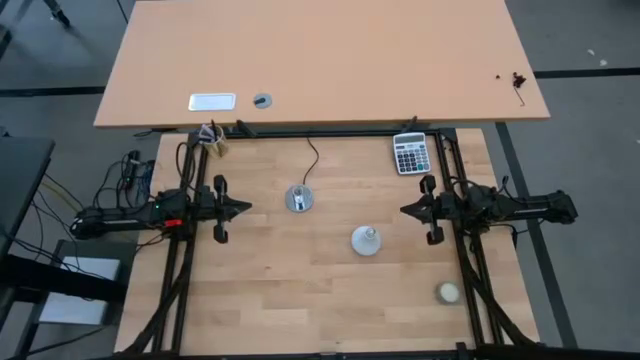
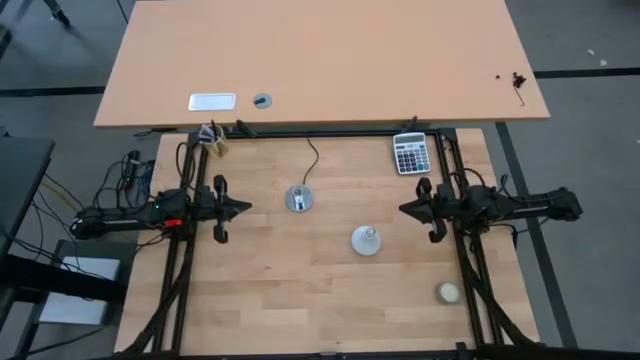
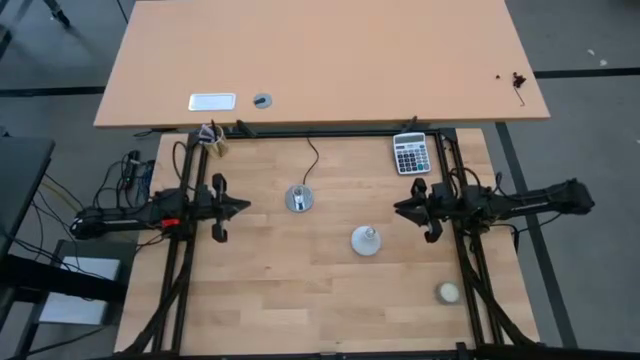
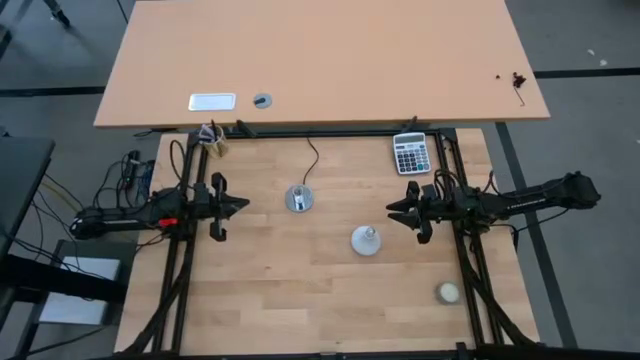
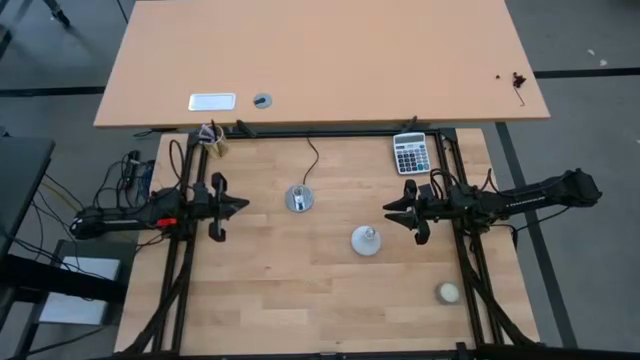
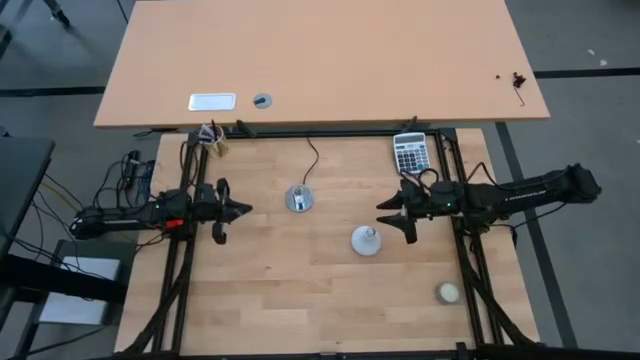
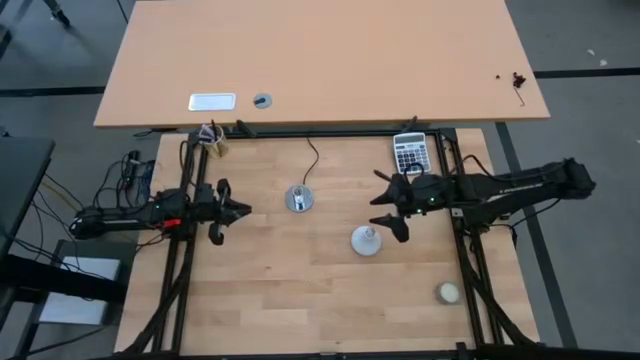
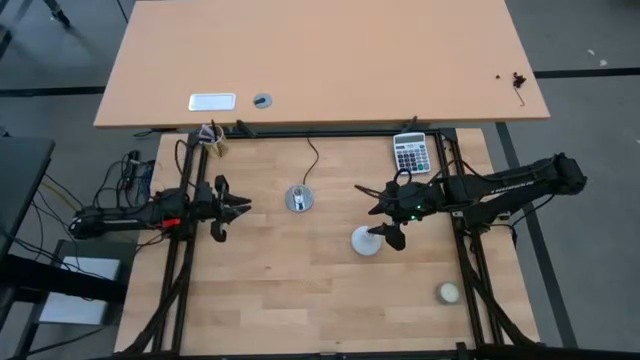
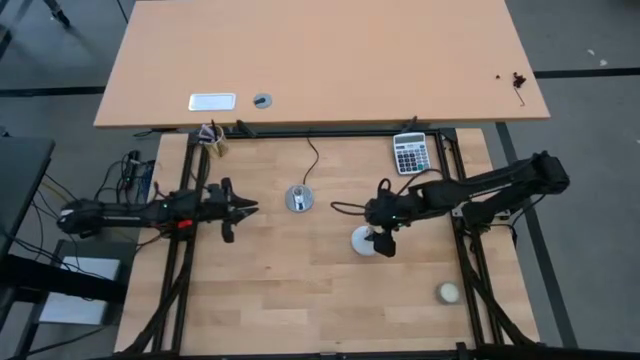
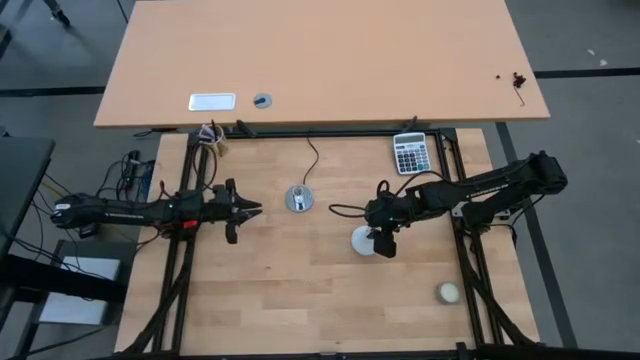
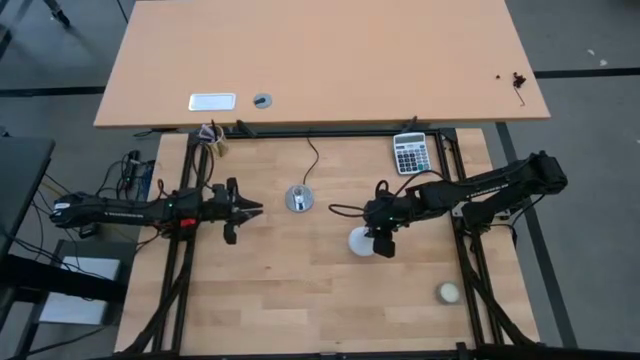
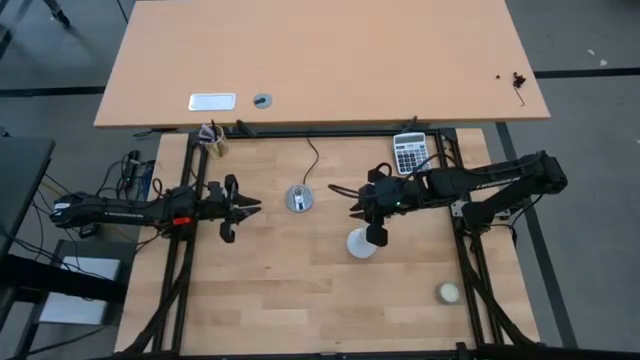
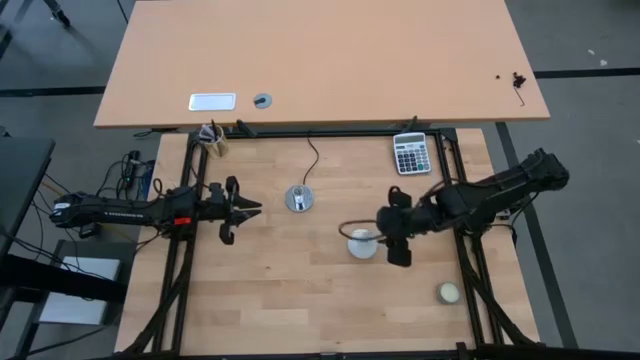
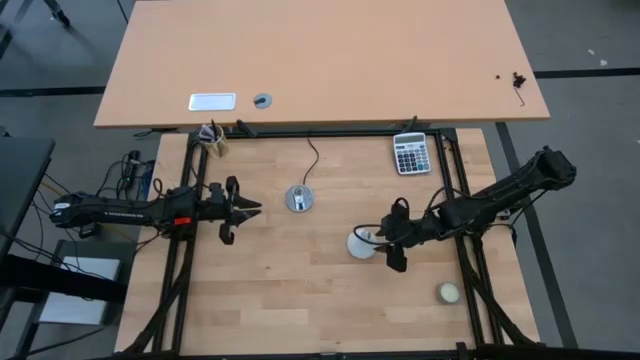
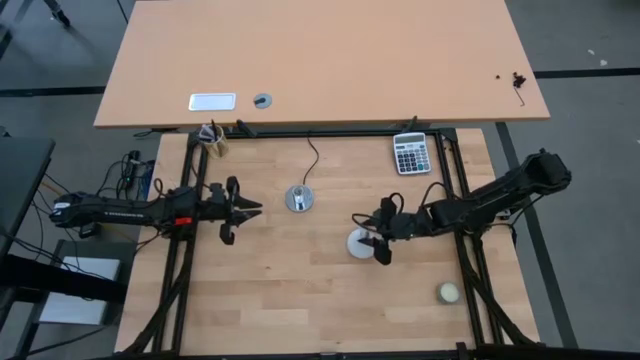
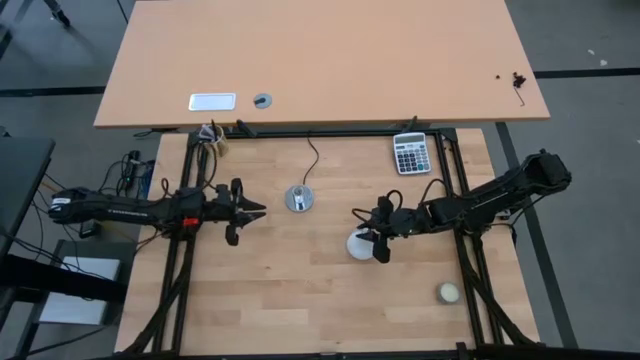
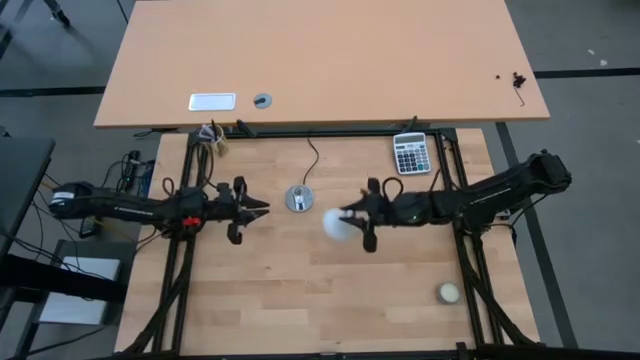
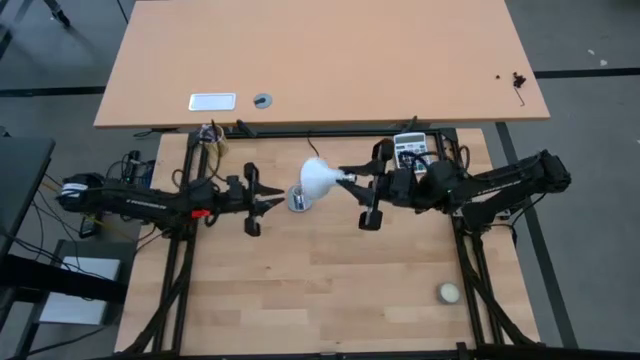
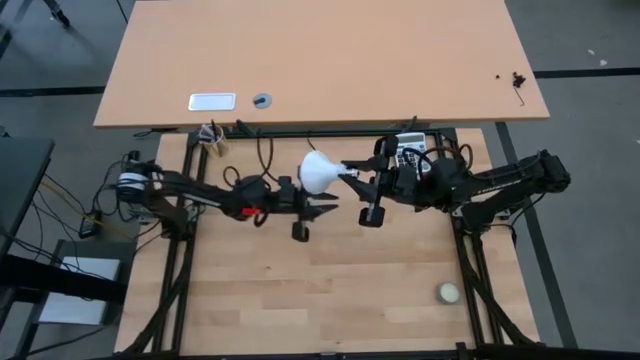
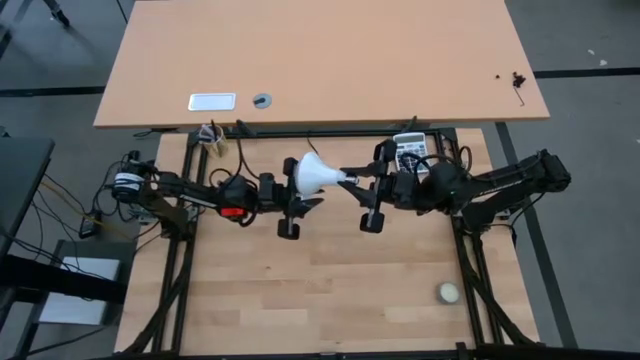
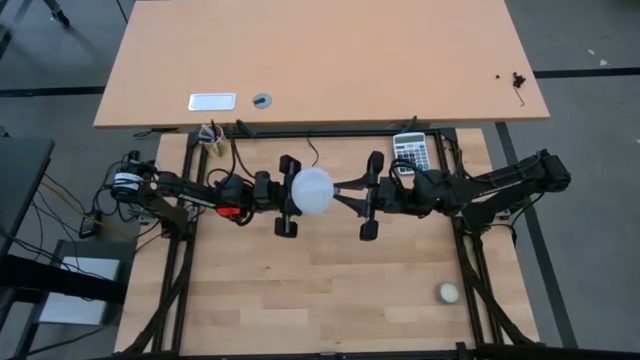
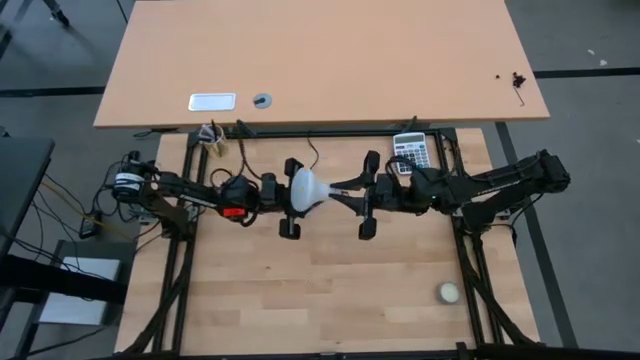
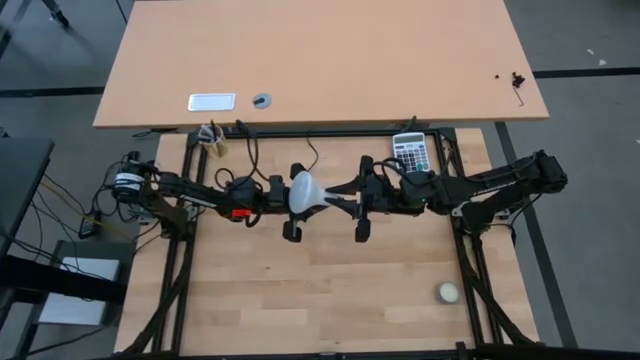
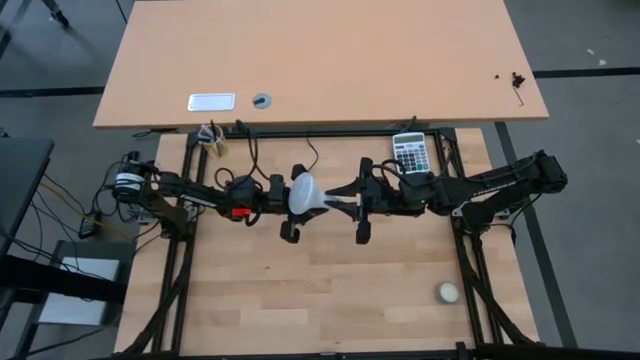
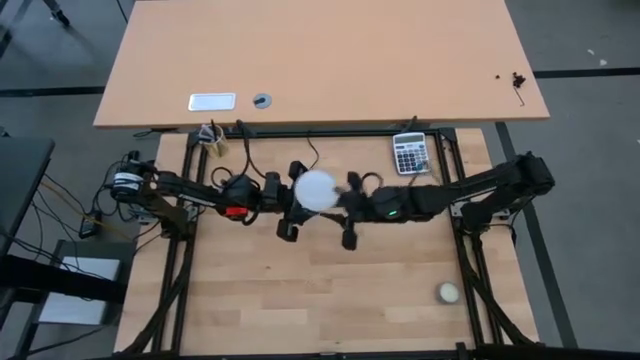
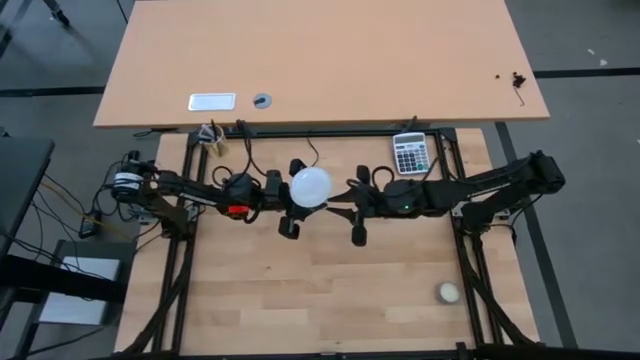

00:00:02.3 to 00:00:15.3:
Task: Screw lightbulb
Insert the white lightbulb into the silver lamp

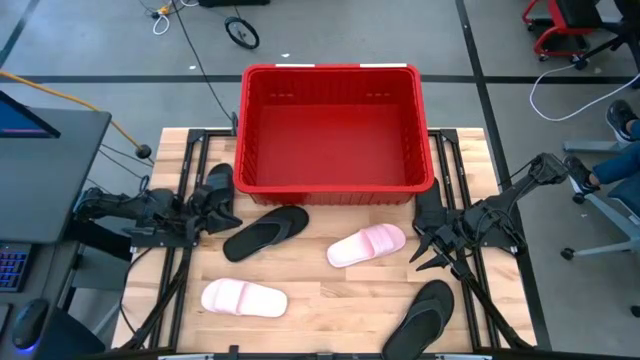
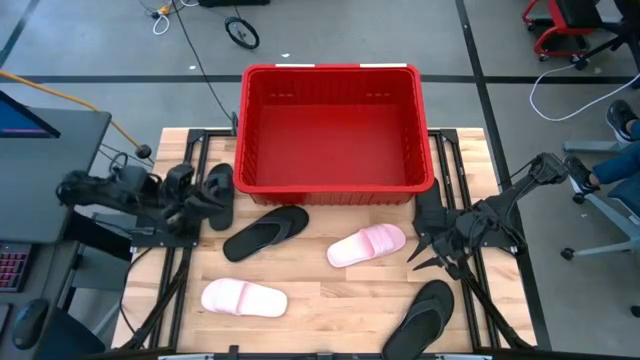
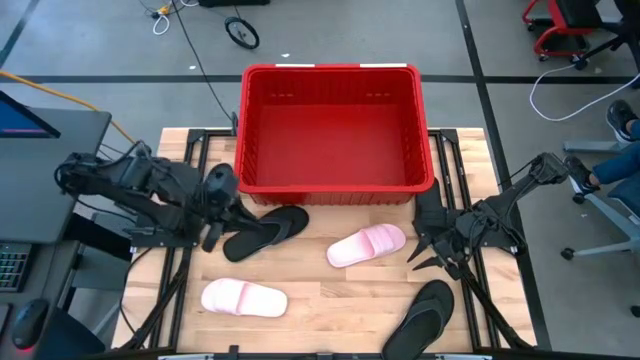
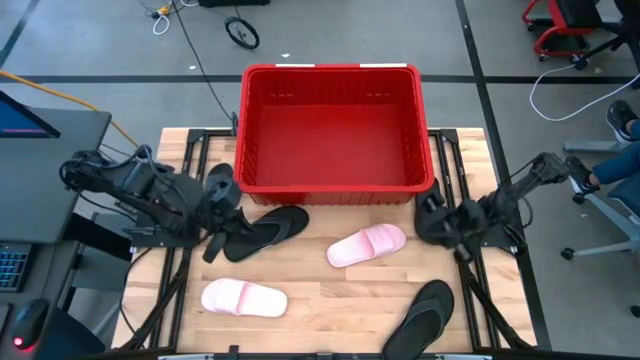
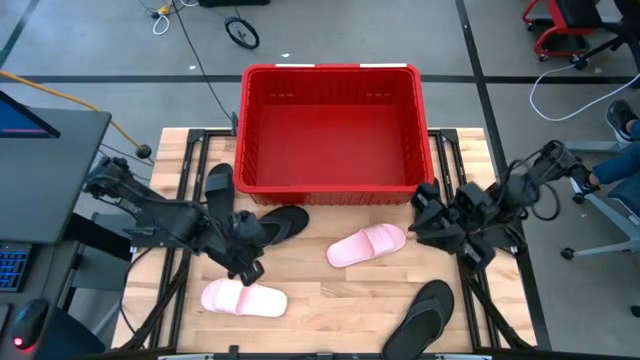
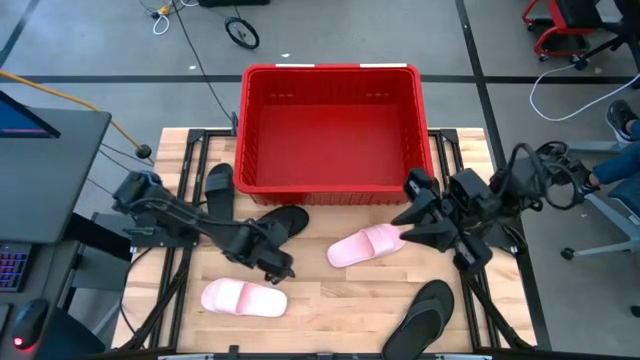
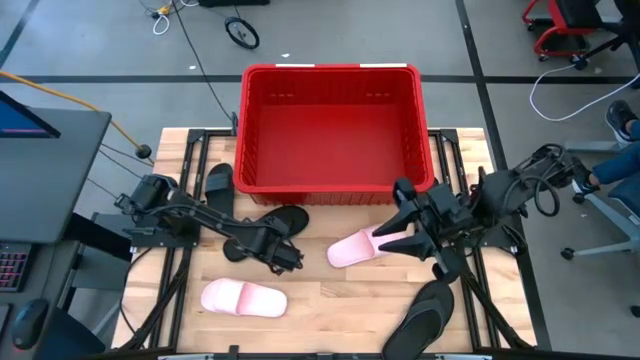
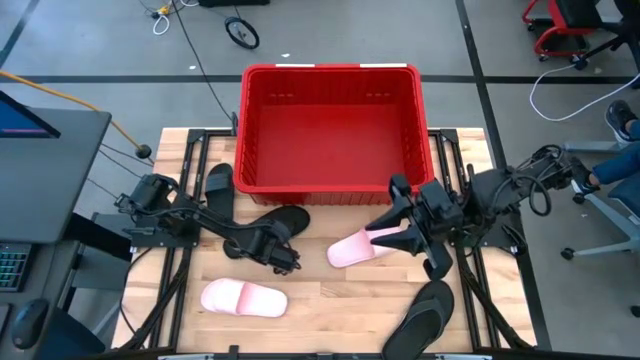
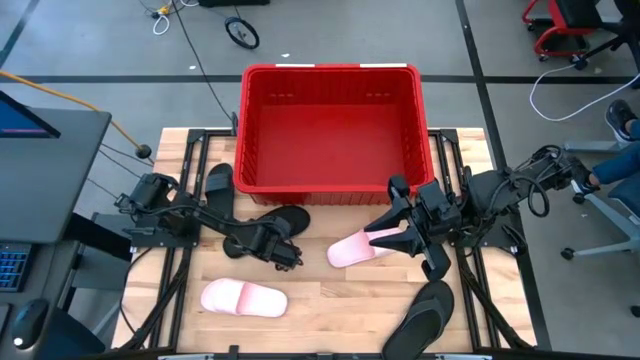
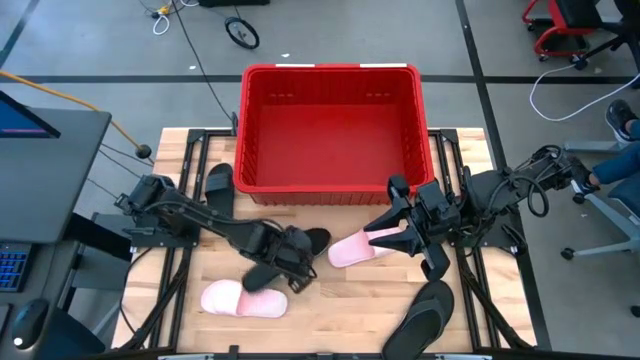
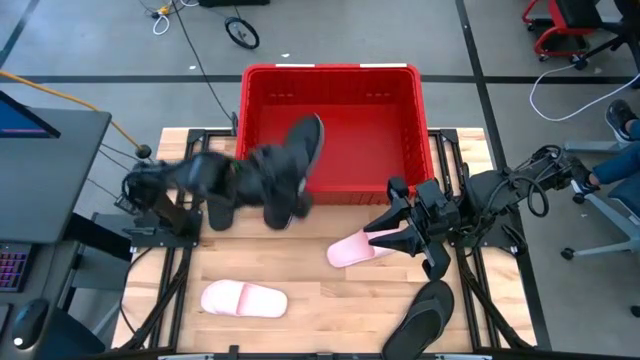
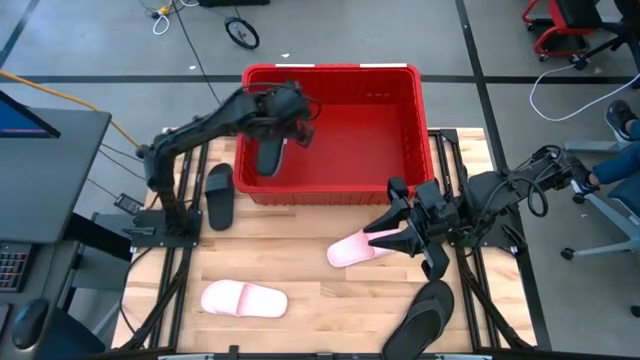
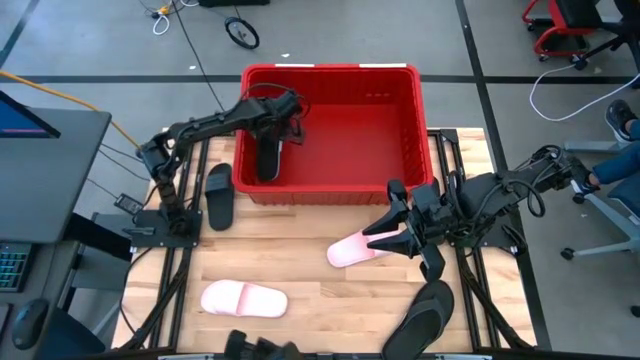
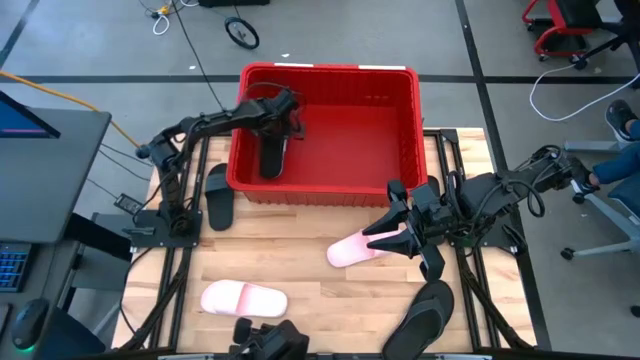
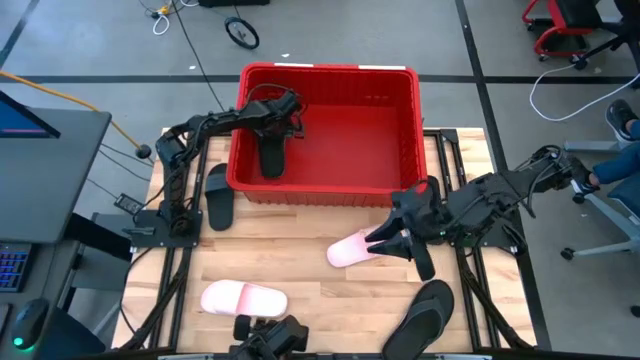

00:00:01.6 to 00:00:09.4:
Task: Pick and place slides into bin
Put the black slipper into the red bin
